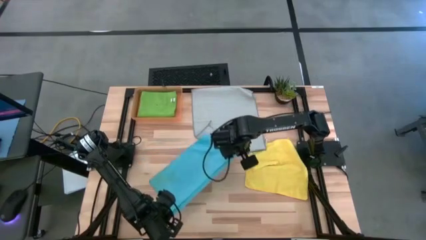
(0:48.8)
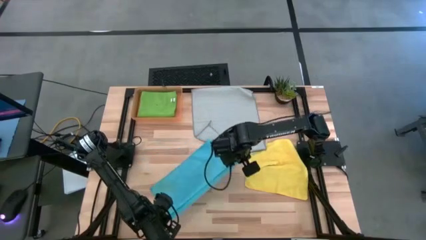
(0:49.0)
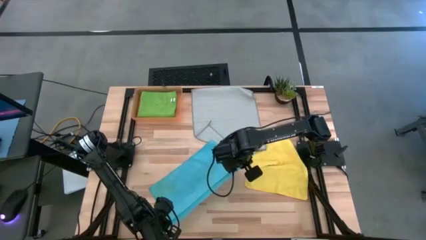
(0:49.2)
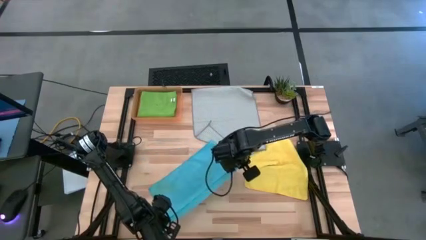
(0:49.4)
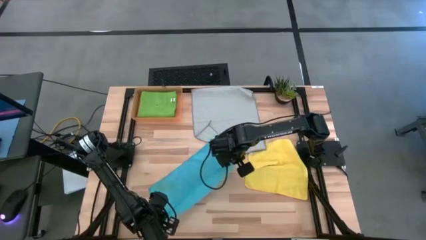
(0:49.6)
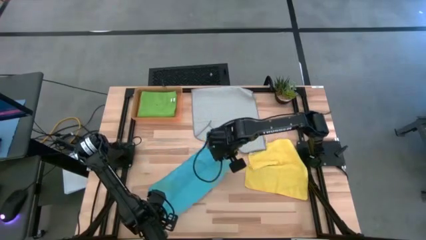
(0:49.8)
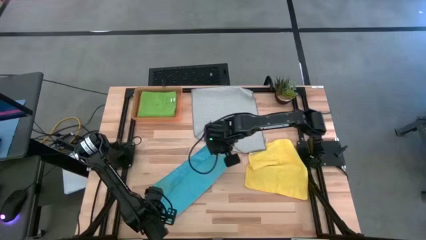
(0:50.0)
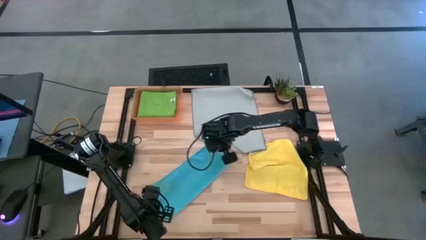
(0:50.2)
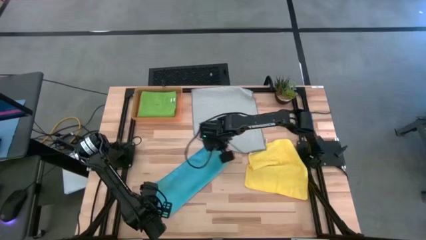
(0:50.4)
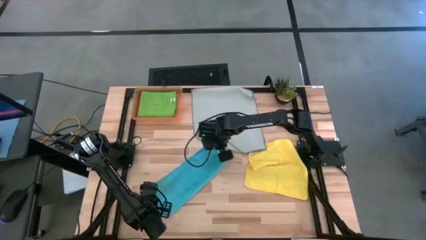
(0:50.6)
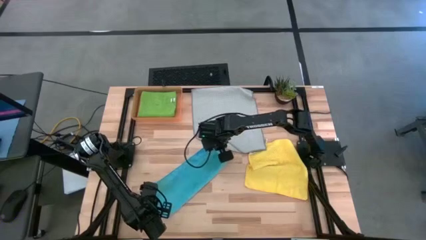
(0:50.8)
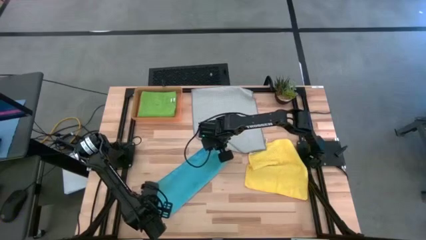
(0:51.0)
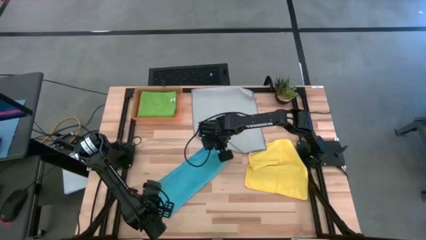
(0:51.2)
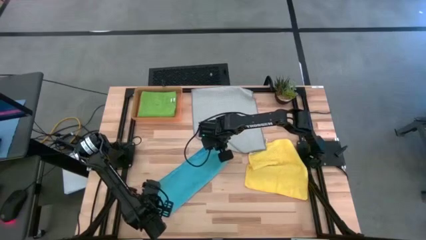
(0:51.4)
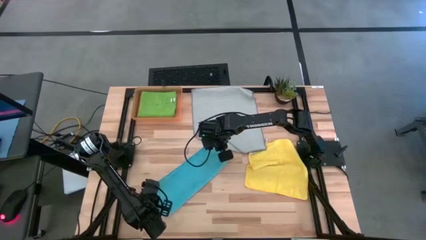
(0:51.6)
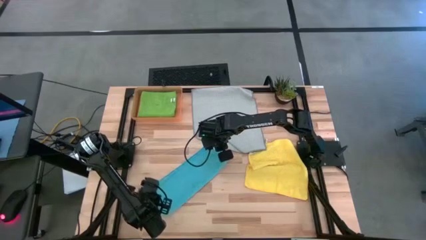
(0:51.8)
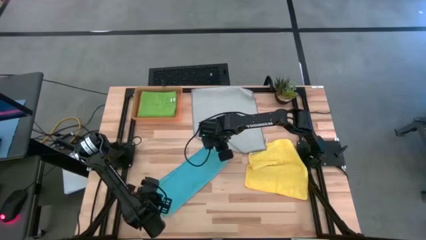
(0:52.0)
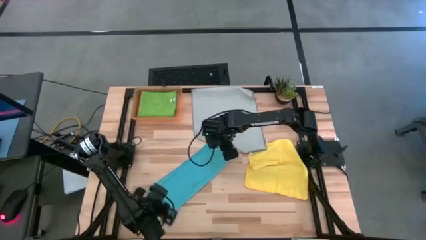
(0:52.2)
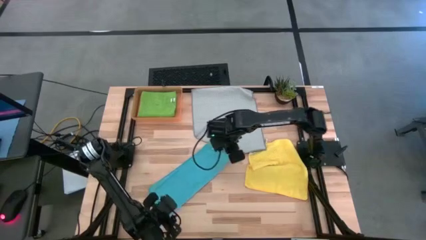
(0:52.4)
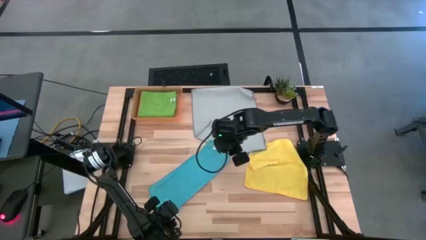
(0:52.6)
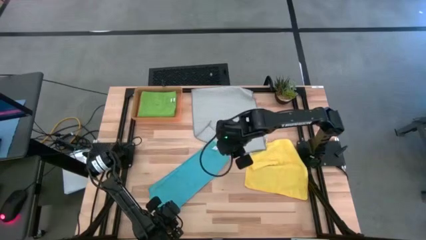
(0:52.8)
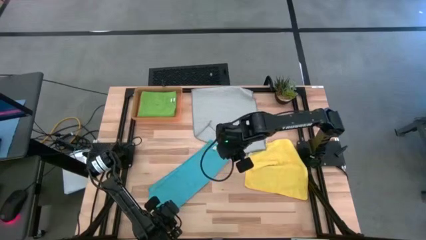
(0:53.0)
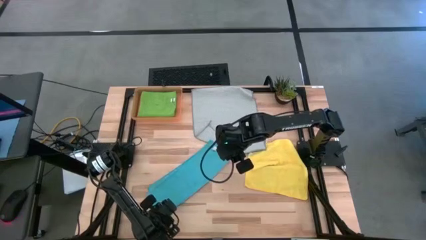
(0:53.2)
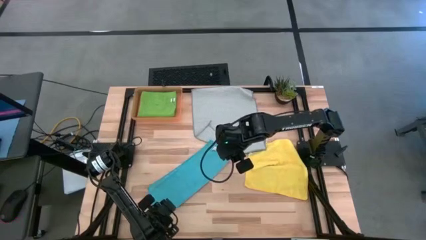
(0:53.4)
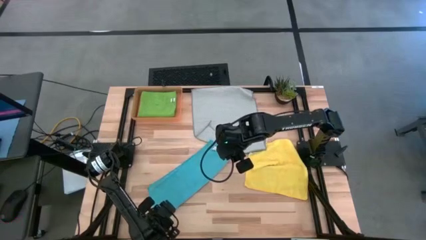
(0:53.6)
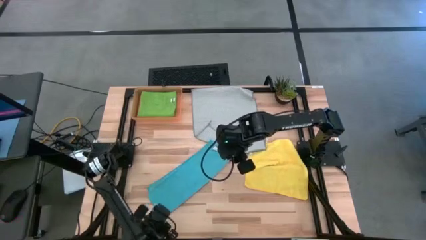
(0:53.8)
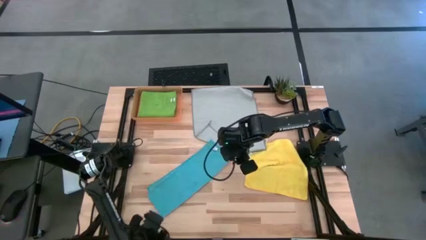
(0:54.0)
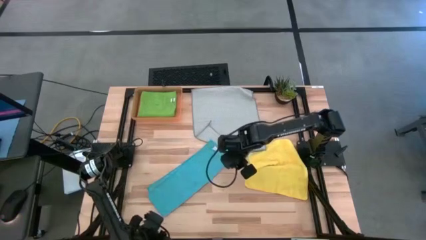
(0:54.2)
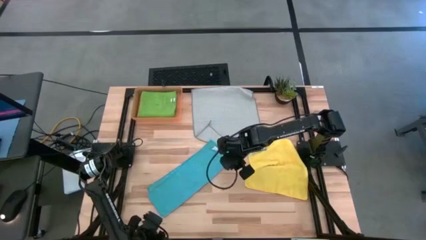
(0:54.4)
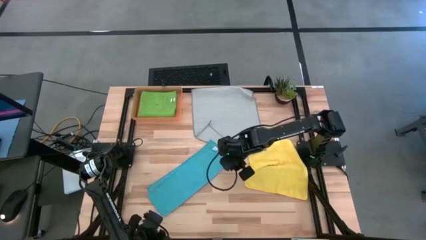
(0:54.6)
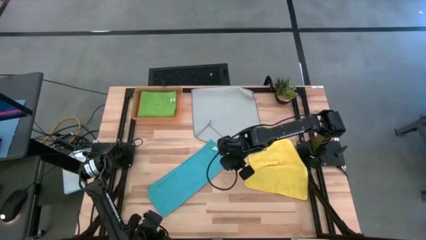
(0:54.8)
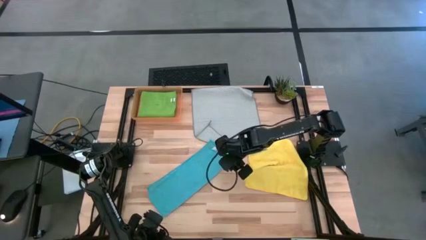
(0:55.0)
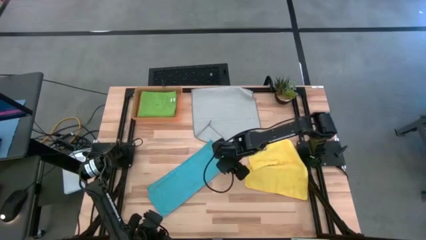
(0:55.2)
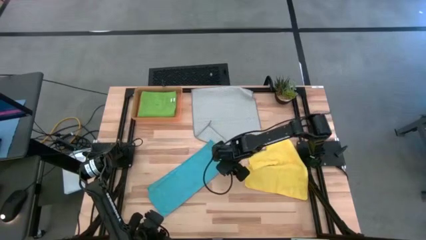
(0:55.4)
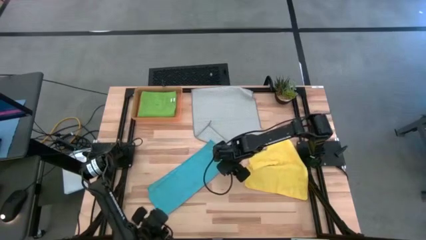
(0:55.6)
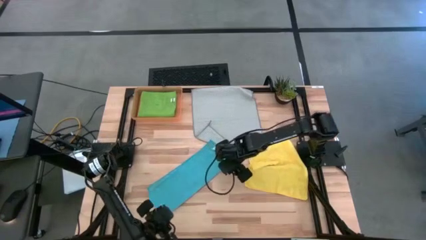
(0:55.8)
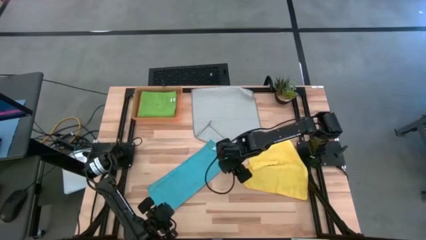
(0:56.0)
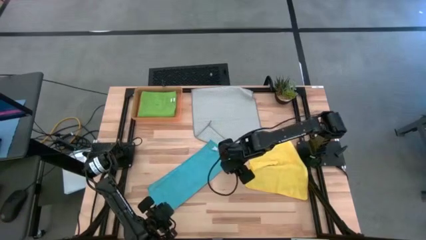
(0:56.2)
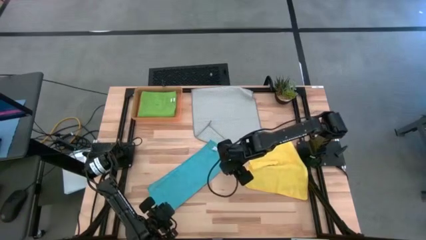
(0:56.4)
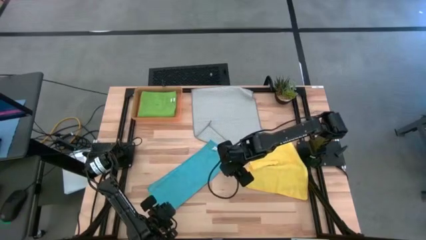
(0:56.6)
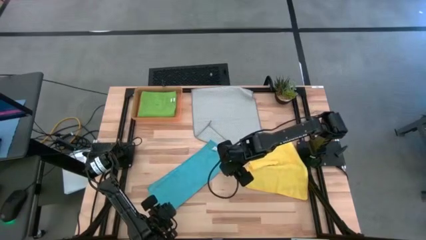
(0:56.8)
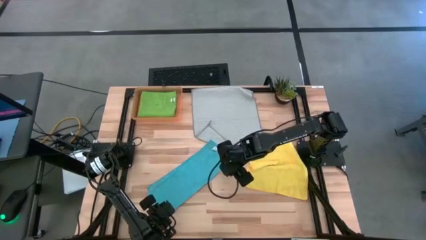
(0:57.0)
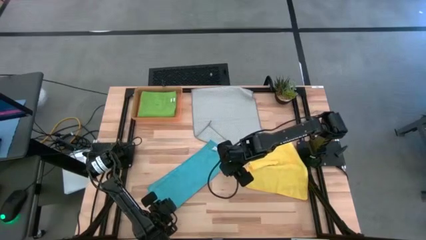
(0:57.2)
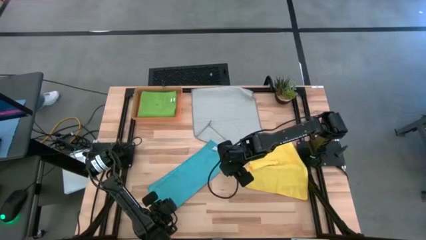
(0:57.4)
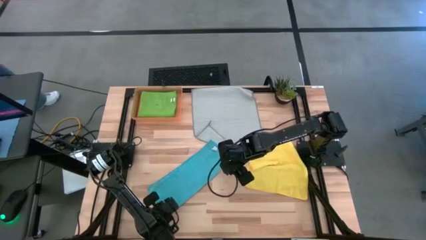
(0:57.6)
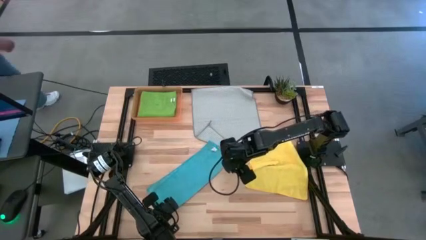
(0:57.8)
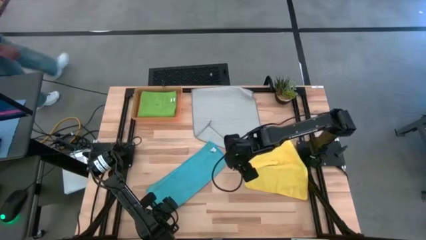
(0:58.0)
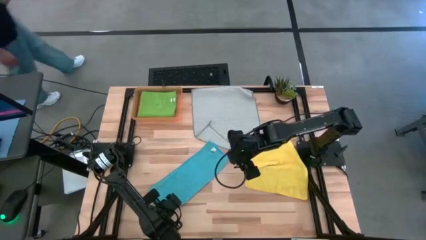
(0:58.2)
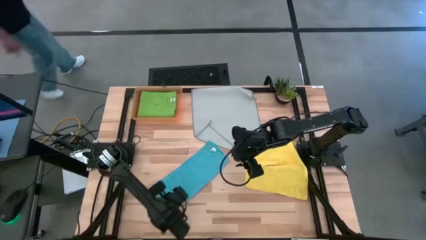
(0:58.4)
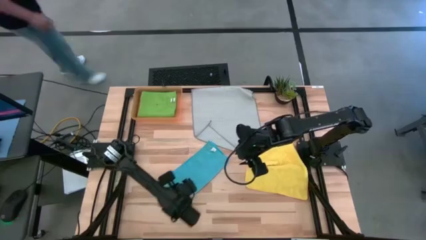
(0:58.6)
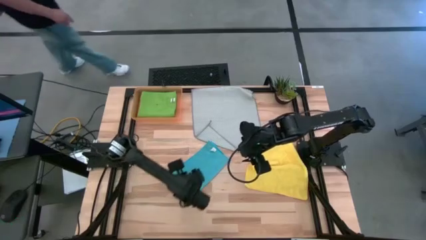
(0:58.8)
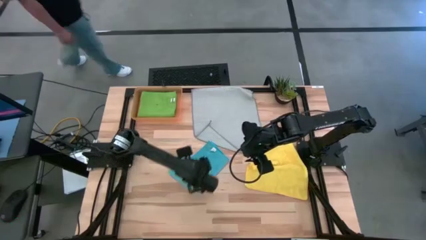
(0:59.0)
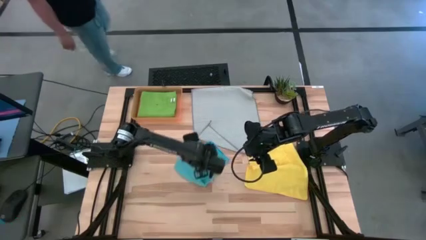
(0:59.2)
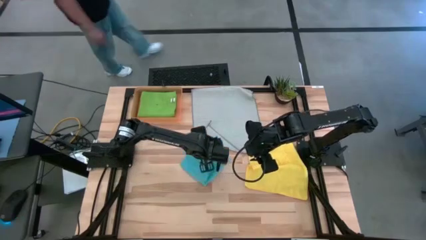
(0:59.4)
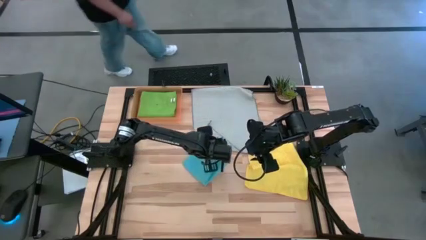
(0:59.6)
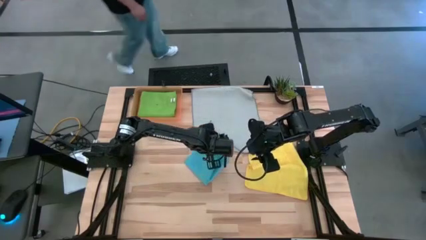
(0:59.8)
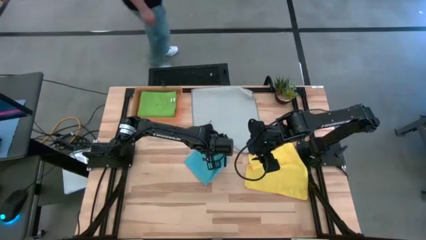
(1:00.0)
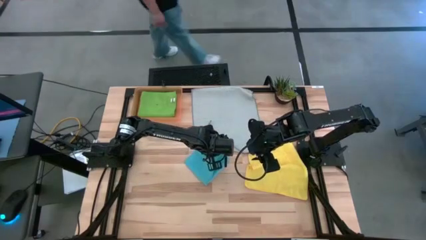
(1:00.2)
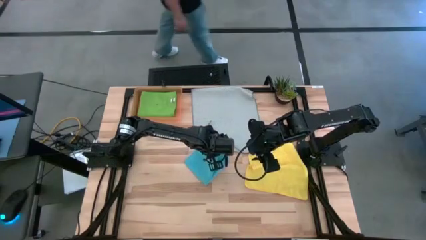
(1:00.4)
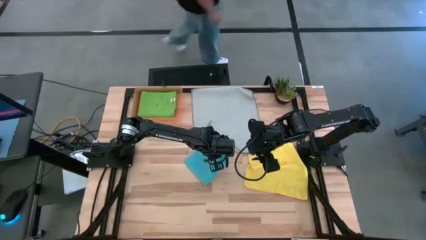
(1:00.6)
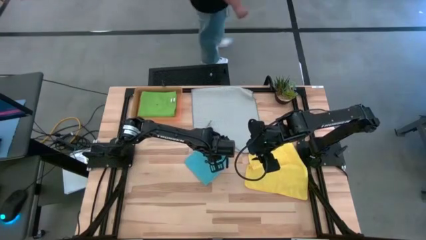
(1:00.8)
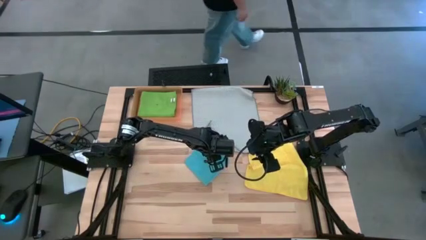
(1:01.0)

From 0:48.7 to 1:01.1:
Task: Fold microfiber towels
Fold the blue microfiber towel

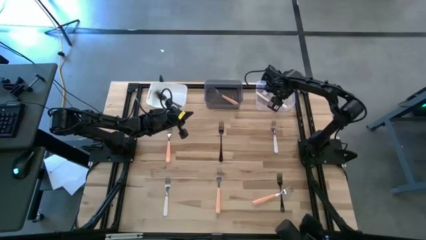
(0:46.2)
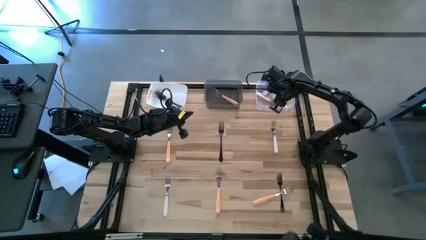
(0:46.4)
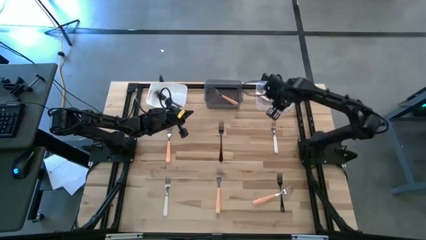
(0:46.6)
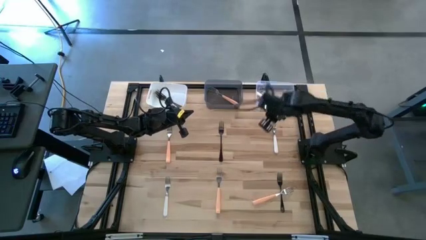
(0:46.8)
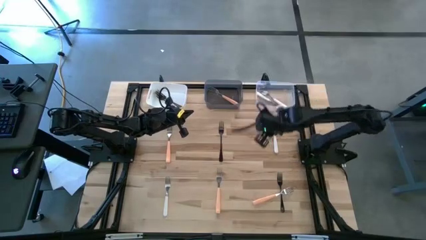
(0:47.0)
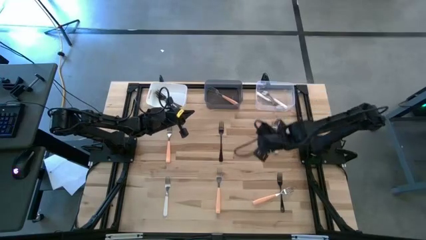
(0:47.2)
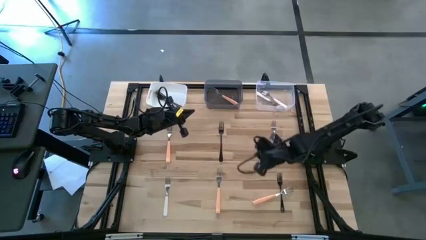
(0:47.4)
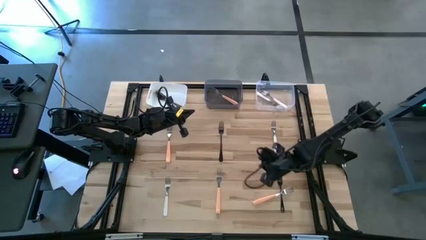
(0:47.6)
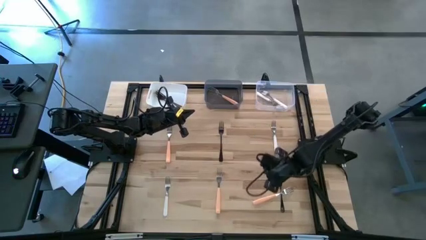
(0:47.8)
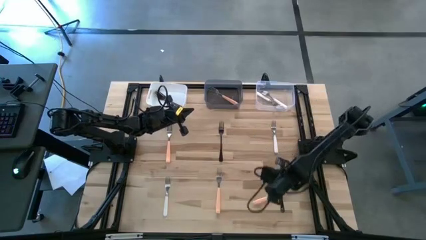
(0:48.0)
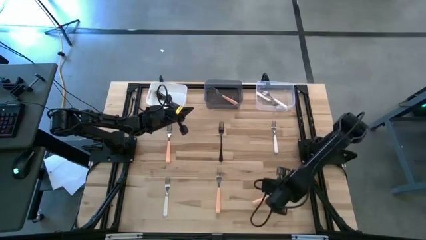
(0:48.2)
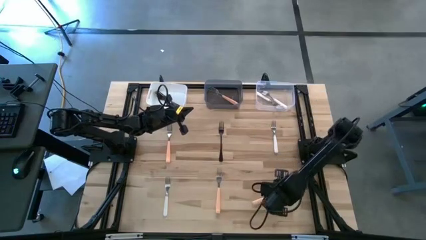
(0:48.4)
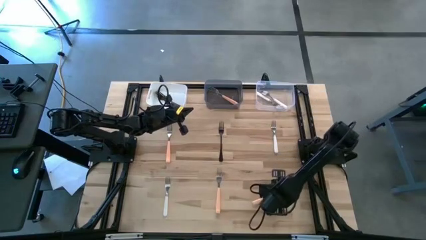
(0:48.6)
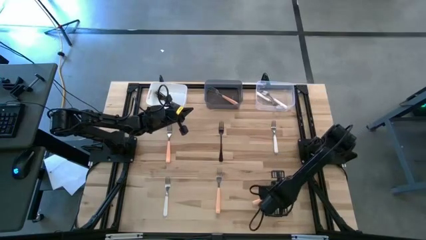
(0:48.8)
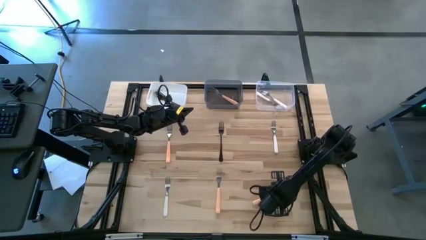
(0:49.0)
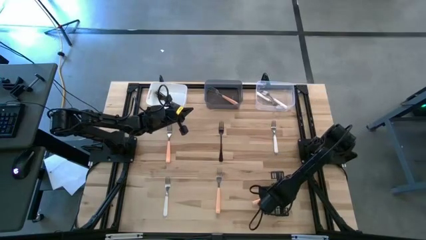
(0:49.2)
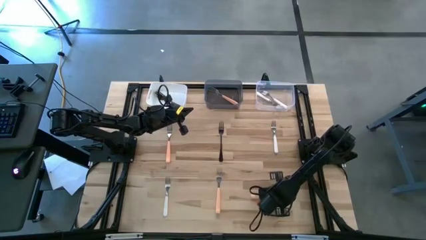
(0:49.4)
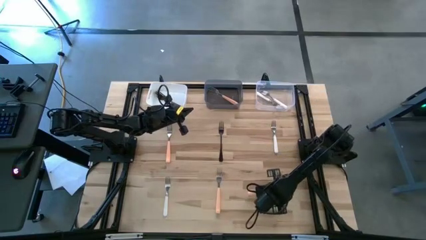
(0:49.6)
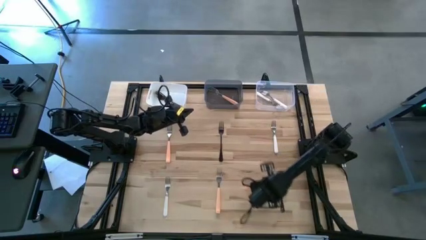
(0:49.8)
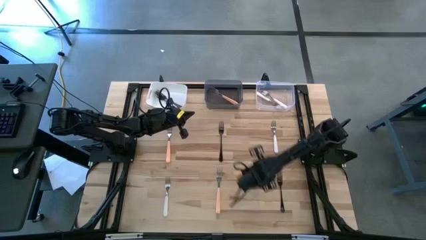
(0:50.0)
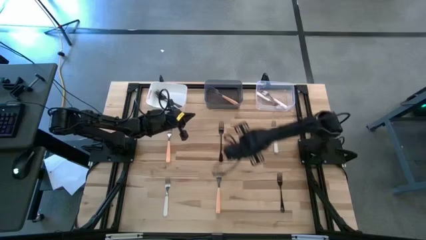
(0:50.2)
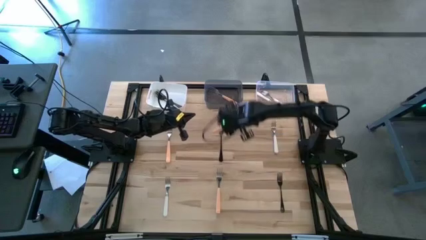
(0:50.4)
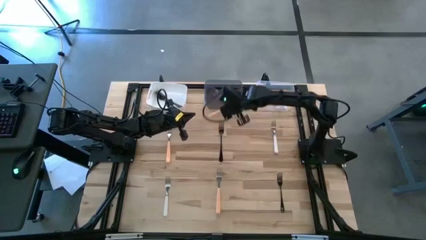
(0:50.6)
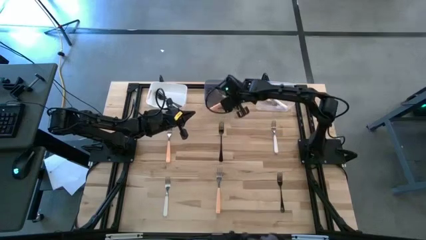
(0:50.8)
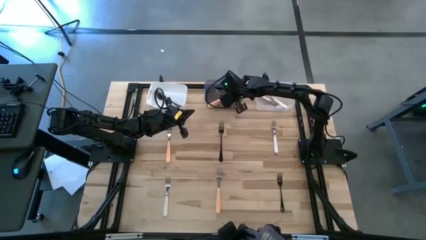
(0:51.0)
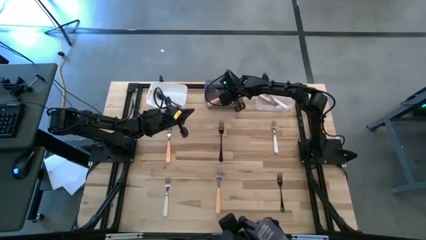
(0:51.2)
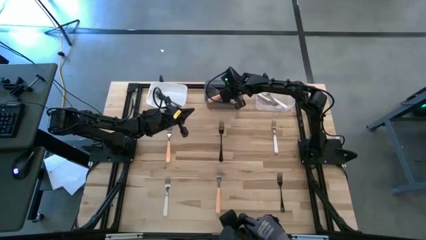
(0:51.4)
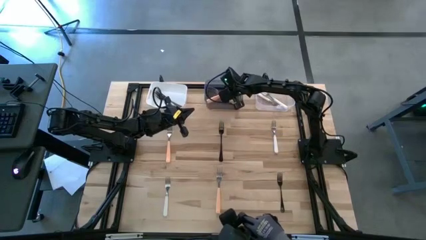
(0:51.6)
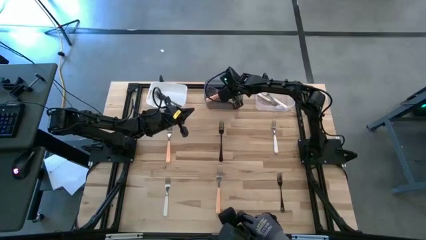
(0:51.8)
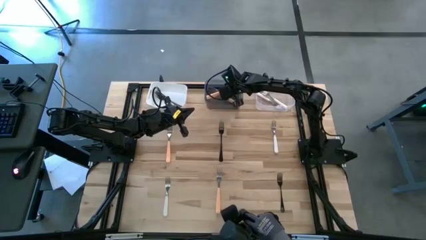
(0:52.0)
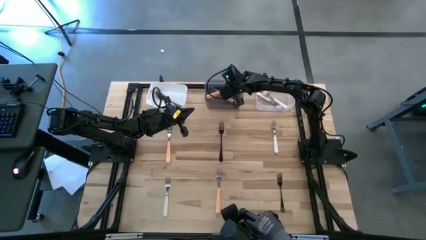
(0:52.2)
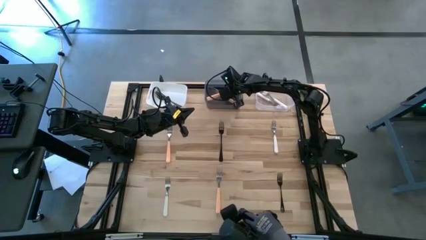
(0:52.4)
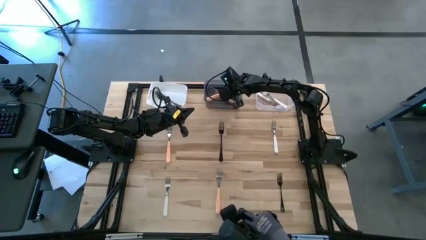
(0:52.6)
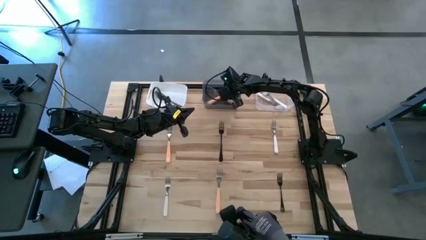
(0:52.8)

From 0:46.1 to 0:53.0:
Task: Sort silverware by color (type)
Put the bottom right orange fork into the black bin
